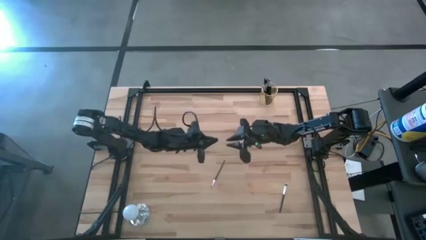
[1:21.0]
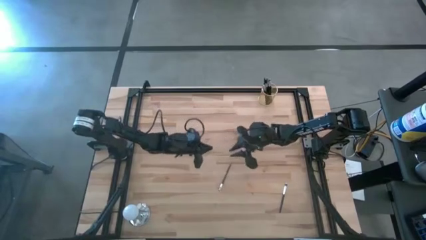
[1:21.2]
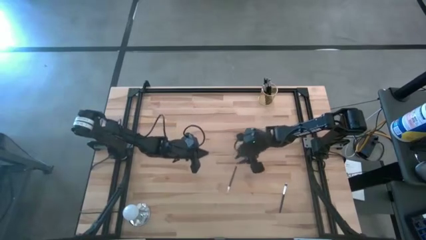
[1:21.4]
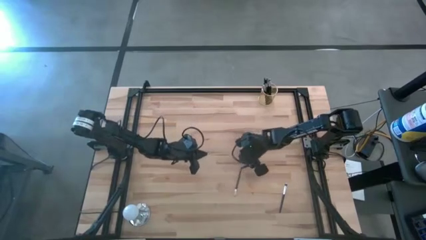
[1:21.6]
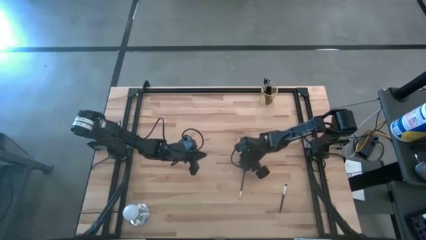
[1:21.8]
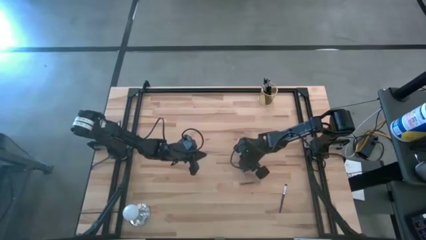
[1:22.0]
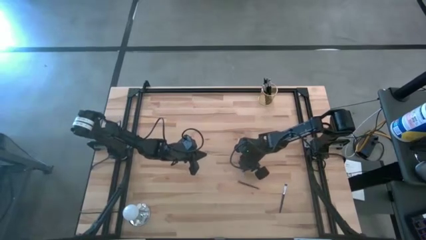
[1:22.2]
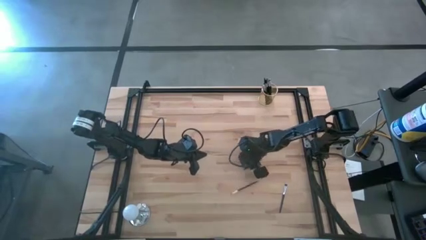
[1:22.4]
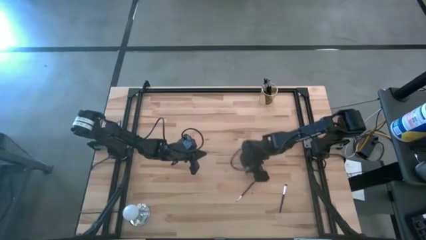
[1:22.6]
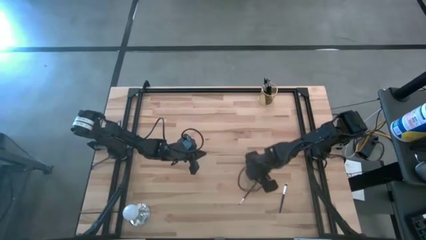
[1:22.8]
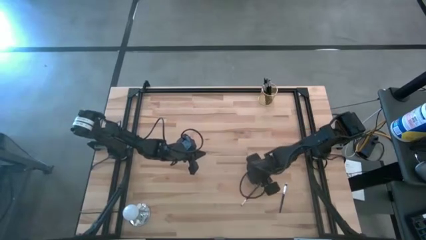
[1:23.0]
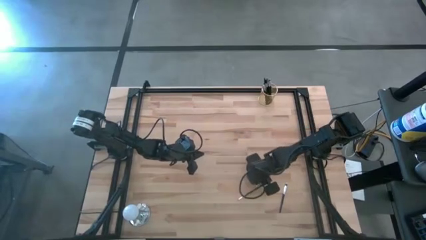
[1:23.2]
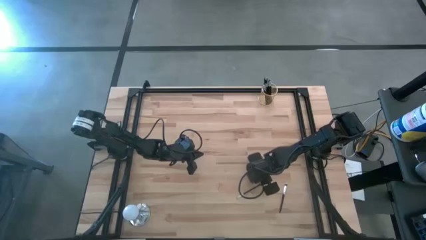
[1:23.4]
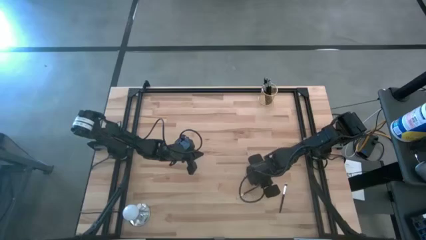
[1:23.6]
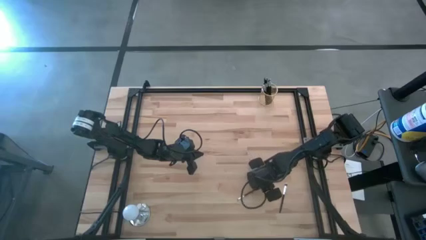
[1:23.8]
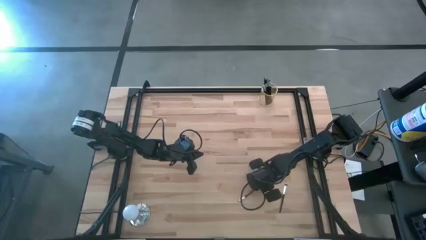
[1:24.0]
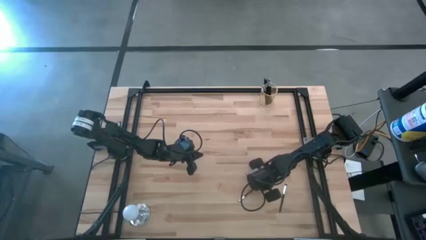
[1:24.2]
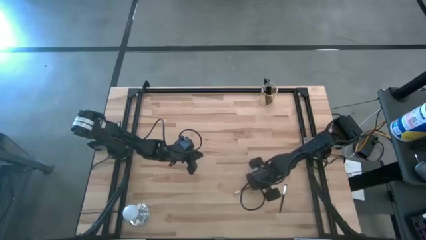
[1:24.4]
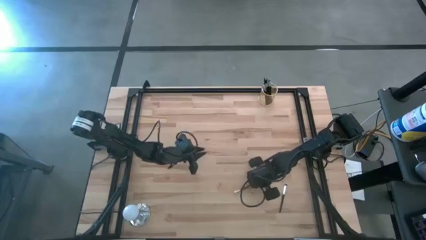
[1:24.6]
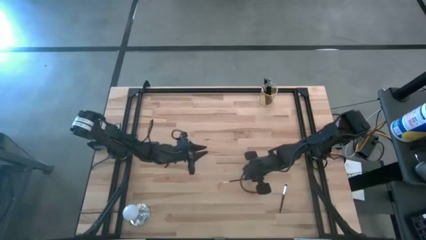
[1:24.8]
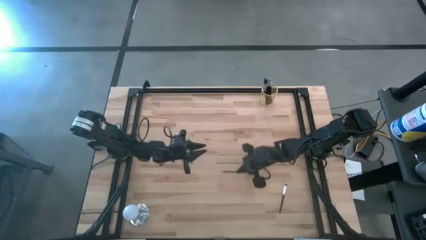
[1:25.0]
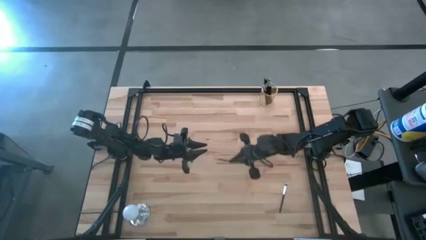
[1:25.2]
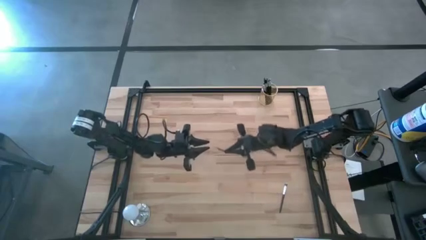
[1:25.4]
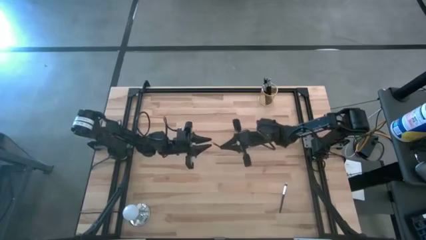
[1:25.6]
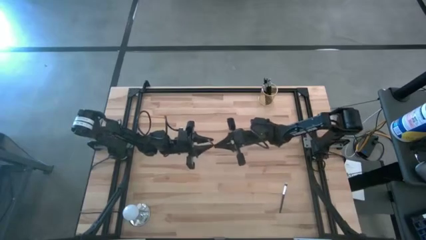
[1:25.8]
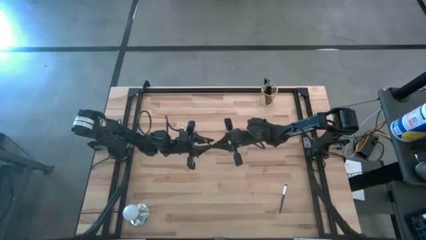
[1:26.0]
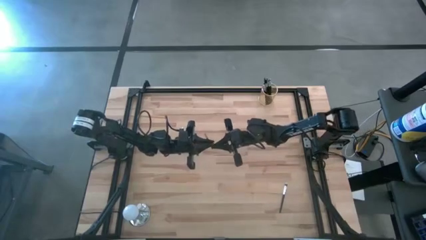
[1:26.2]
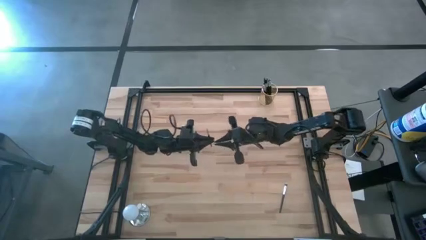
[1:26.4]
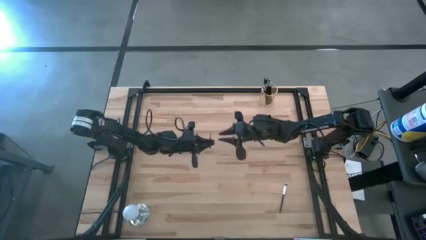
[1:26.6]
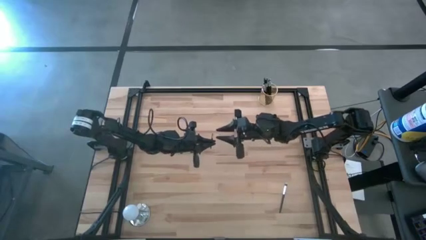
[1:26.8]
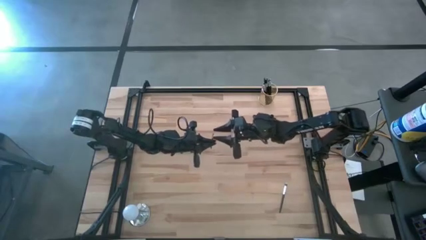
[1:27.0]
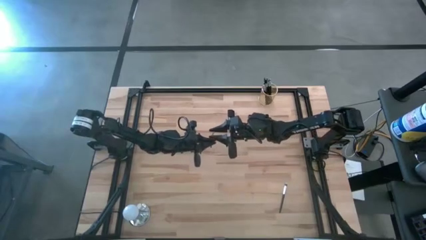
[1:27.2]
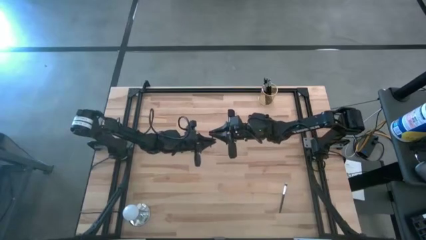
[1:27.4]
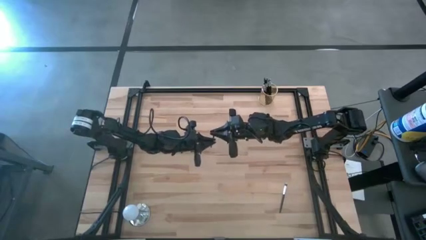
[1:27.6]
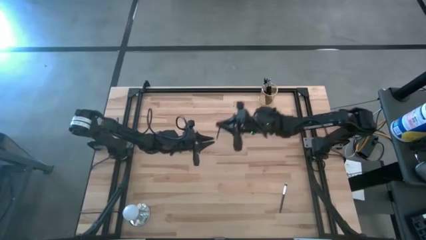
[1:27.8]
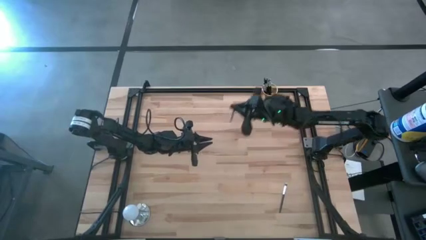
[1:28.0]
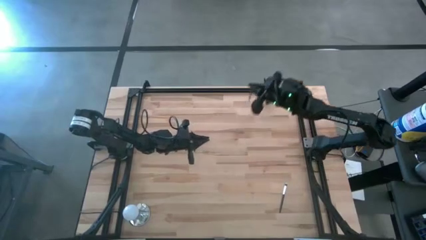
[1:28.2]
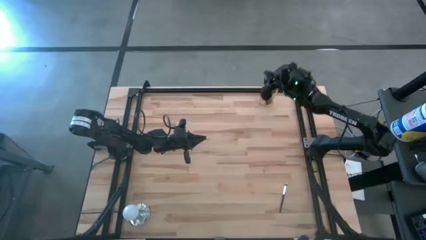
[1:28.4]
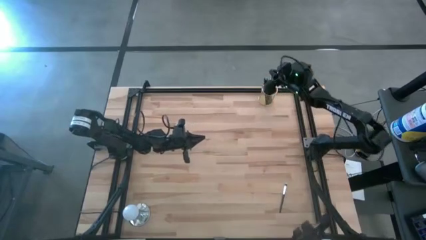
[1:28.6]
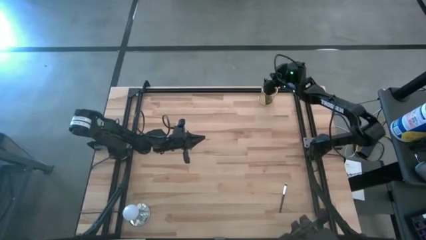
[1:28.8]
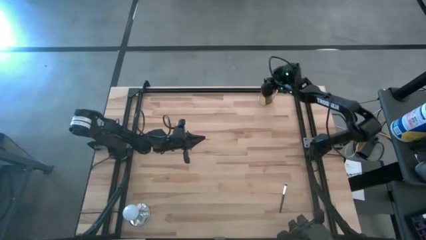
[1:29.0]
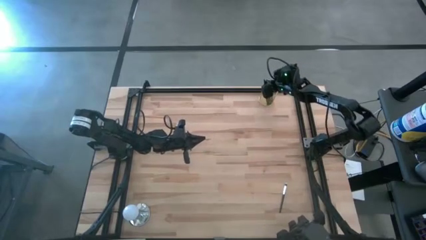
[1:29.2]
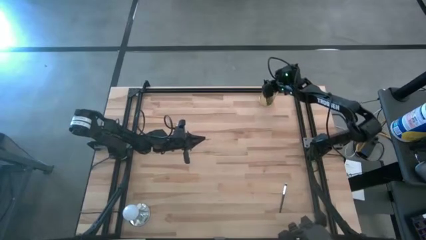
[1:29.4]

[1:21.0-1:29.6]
Task: Put items in baskets/containers
Put the black eyeshadow brush into the gold pen holder

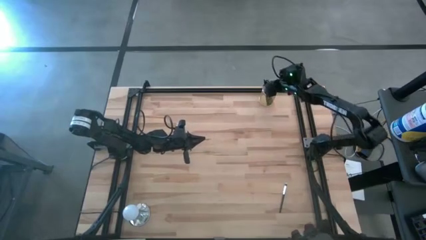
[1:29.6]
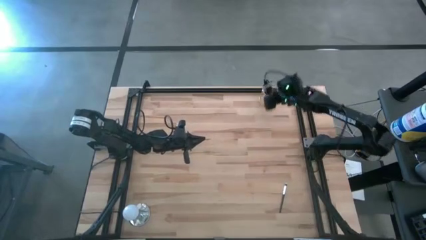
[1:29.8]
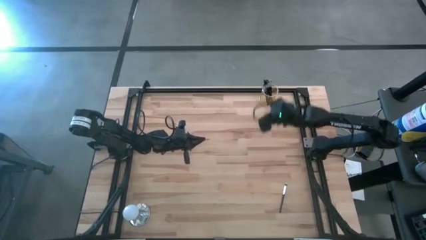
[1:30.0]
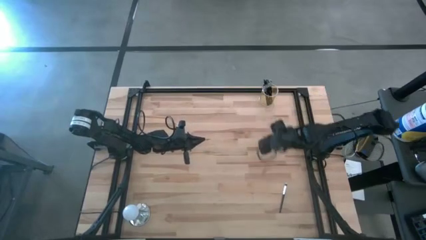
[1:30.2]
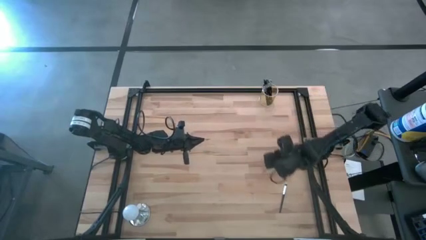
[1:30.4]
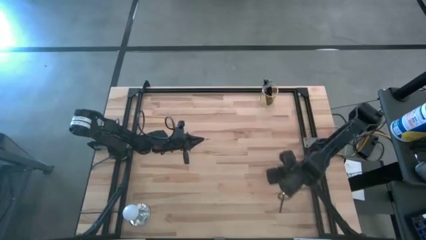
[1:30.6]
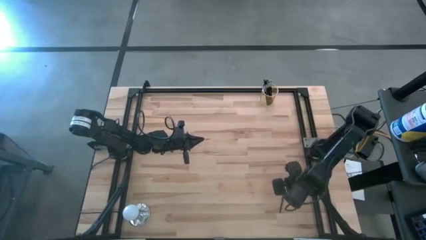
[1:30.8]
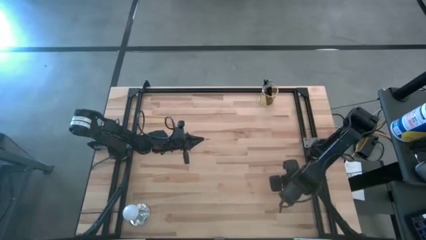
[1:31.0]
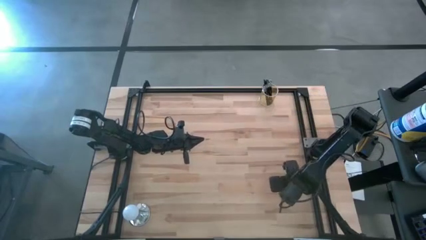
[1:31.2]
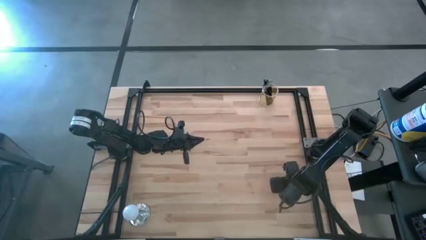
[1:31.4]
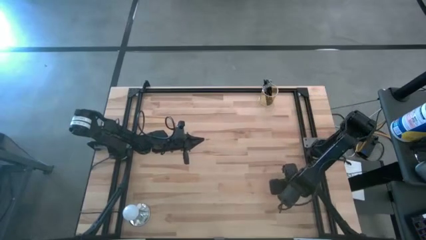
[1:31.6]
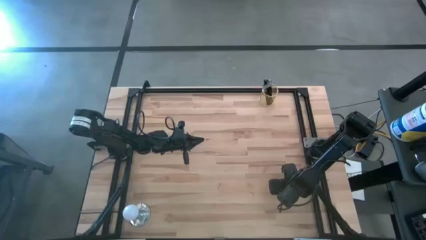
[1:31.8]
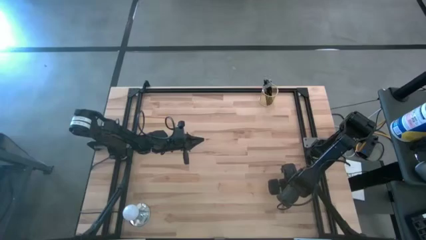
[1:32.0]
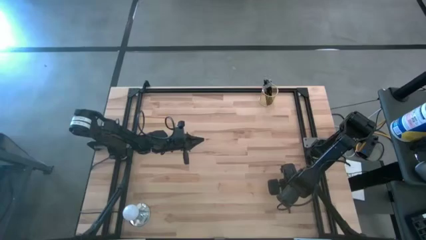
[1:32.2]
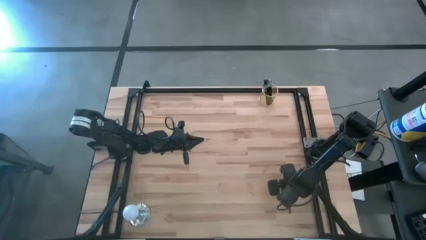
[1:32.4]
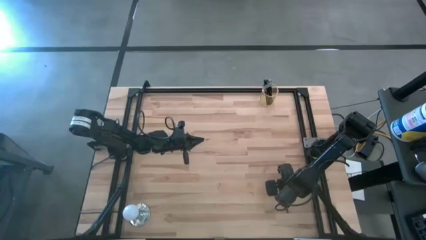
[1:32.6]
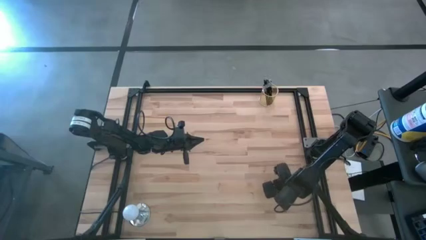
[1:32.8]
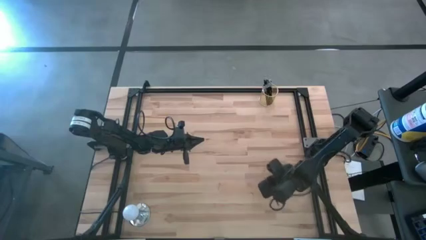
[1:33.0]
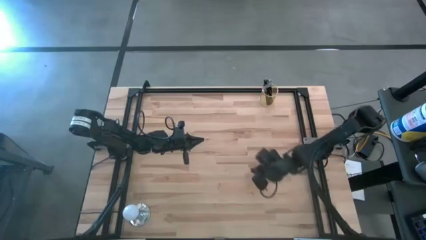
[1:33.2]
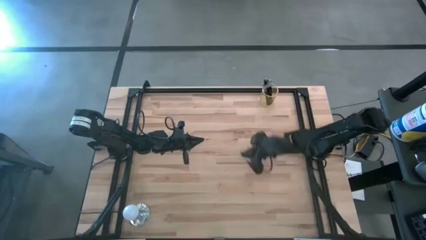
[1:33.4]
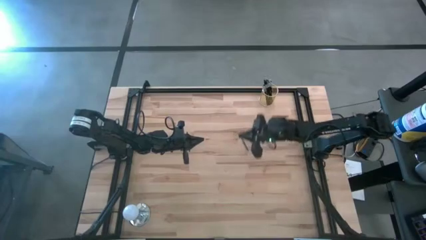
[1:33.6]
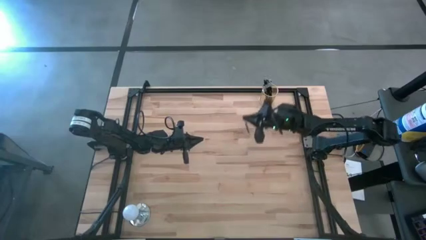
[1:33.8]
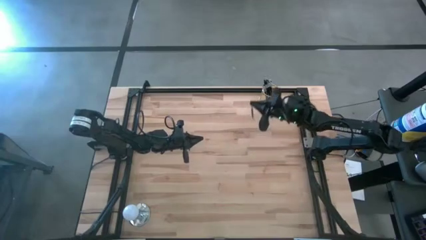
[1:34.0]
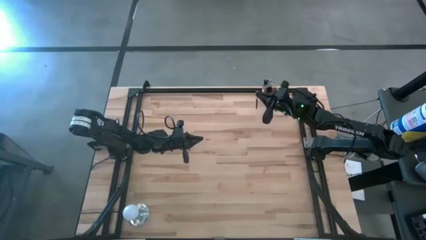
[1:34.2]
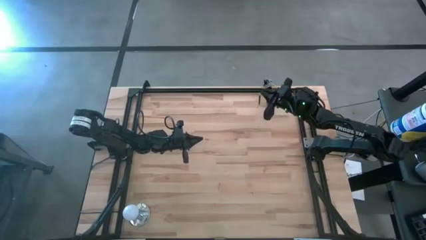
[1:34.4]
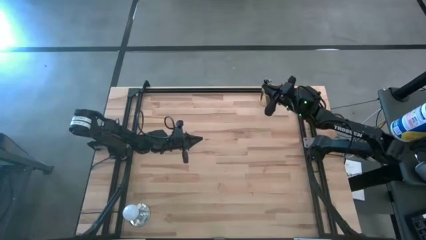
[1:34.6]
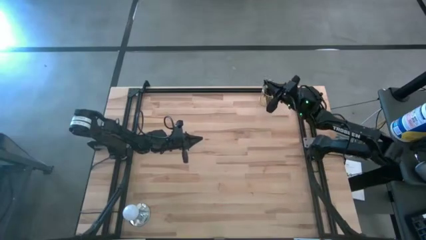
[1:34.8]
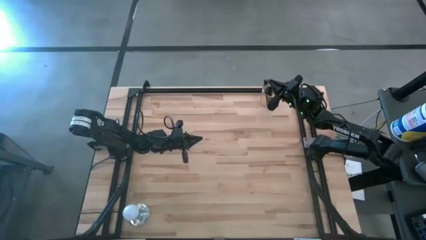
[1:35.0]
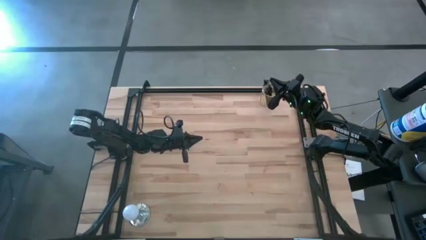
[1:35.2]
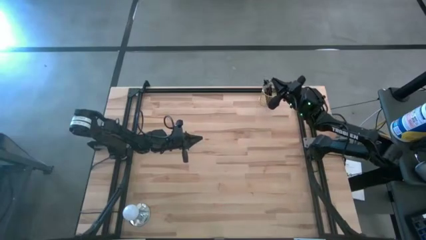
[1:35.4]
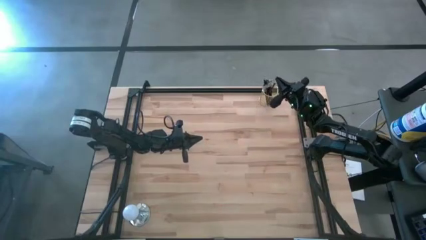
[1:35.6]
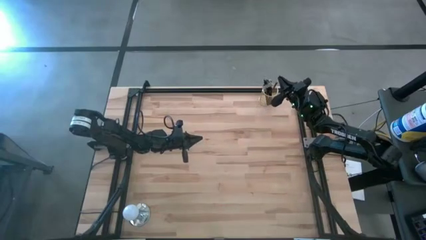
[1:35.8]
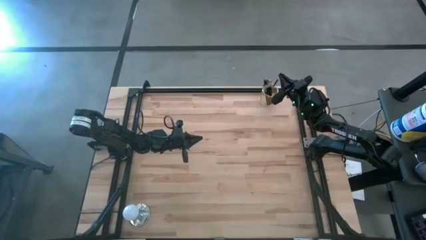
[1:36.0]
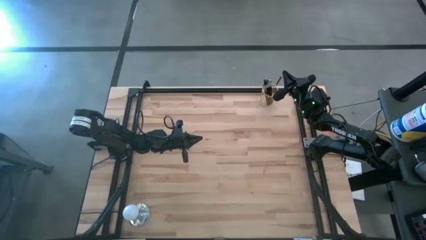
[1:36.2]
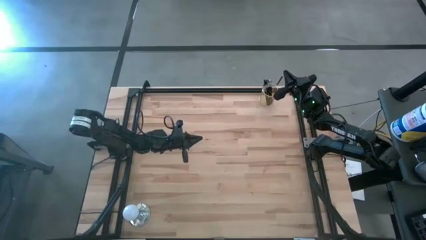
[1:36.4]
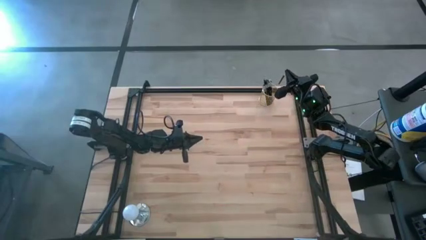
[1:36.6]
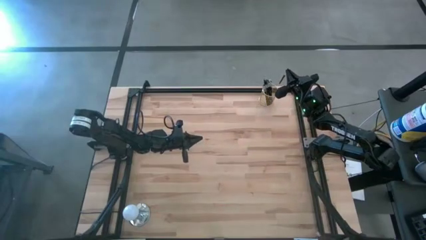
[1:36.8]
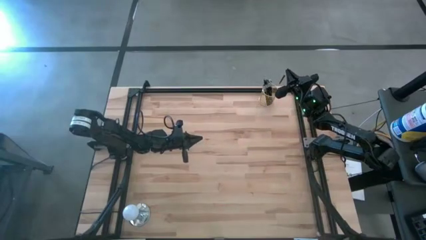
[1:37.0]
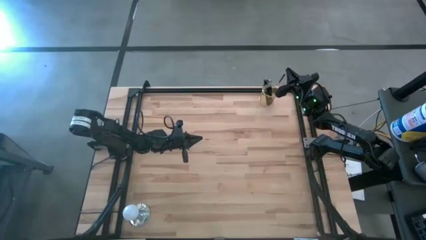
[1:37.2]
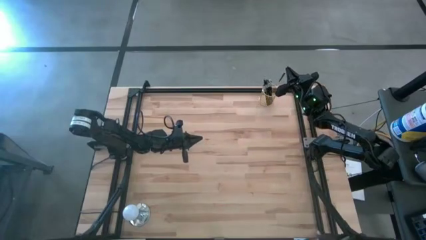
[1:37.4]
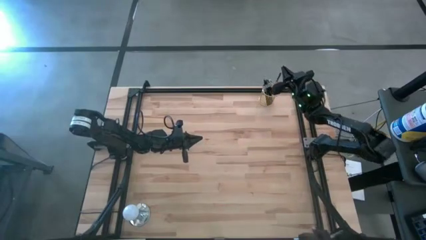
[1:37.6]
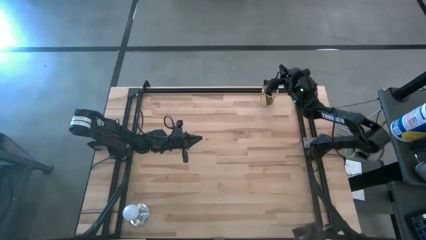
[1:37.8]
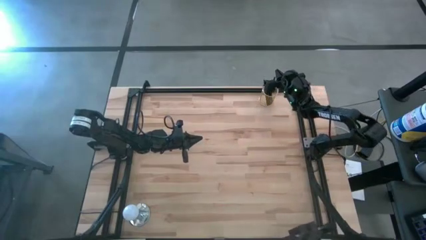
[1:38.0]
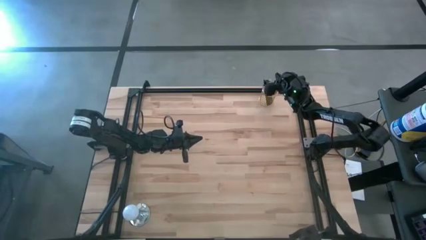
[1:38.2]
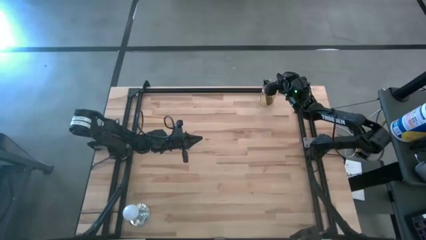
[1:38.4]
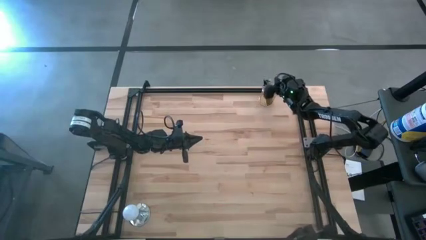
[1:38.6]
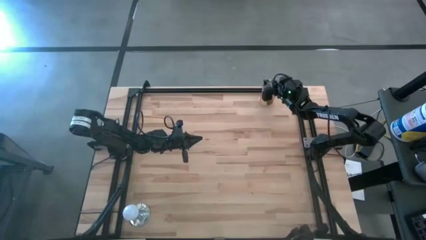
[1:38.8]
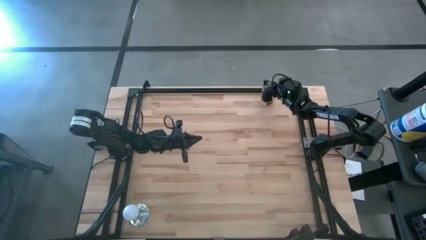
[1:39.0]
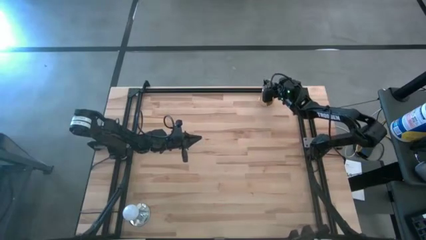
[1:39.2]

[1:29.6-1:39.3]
Put the black eyeshadow brush into the gold pen holder
